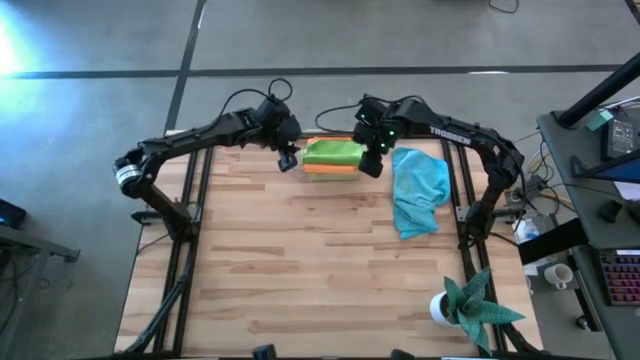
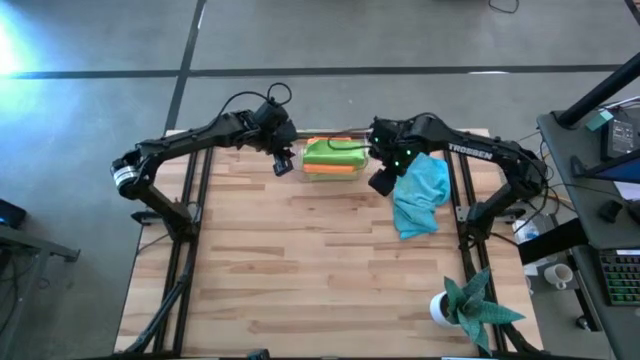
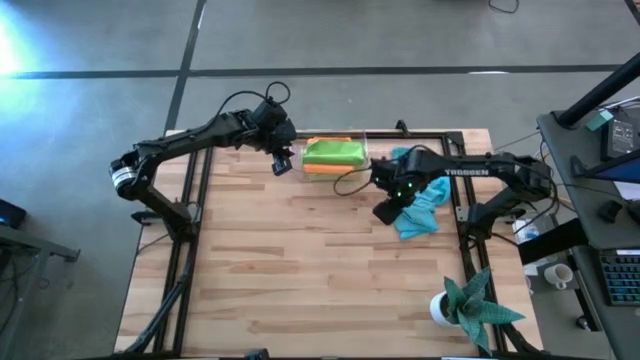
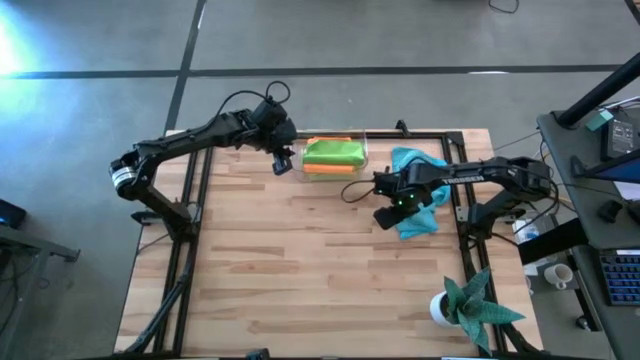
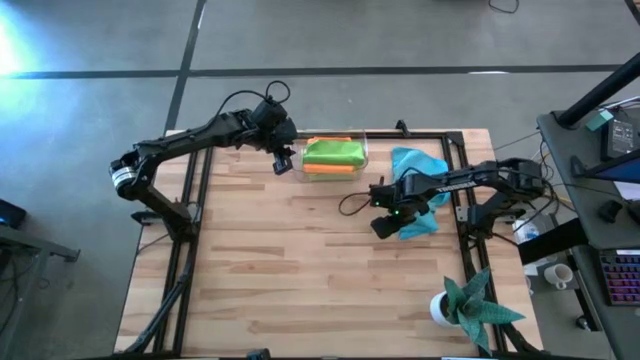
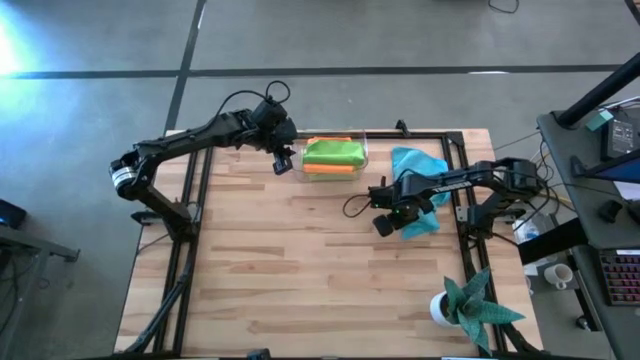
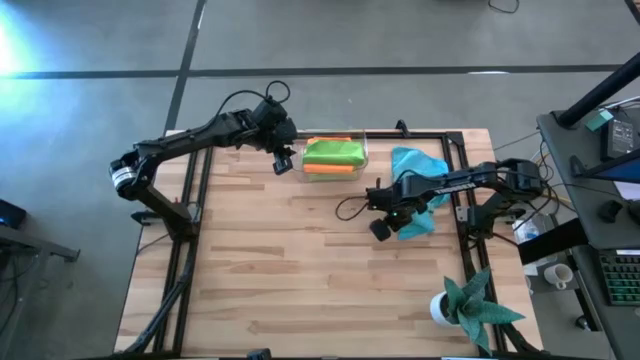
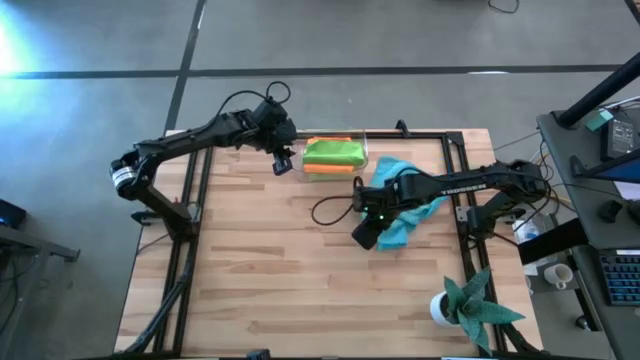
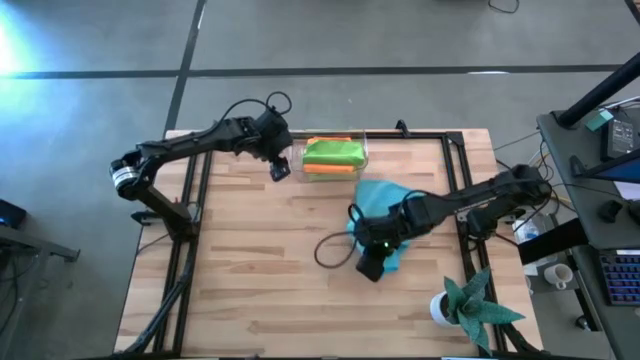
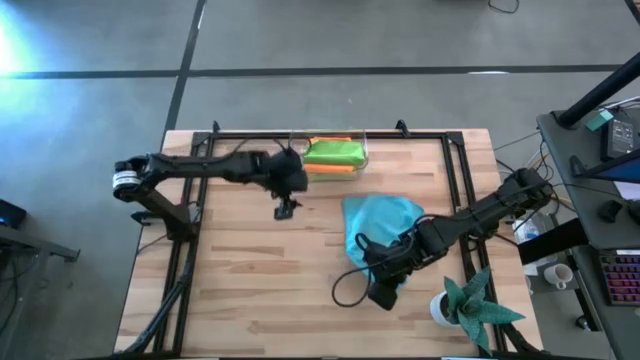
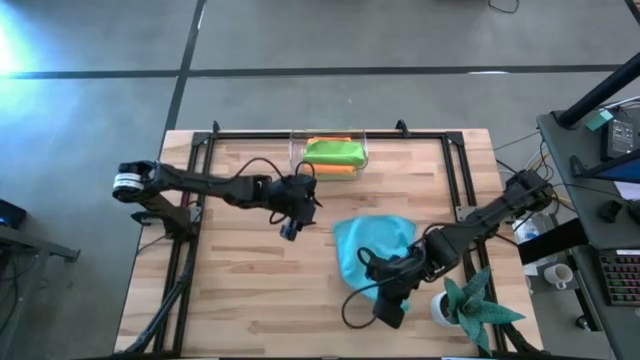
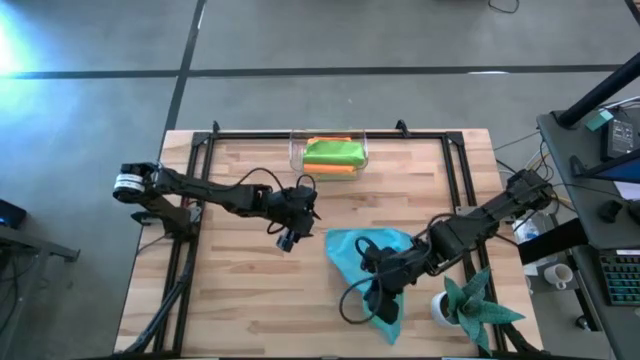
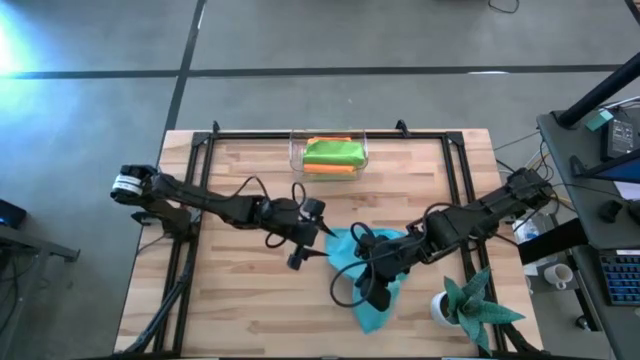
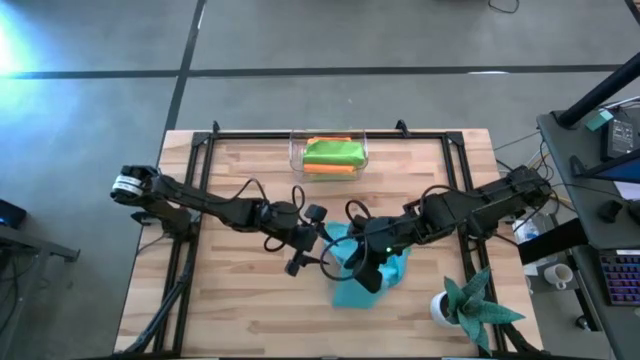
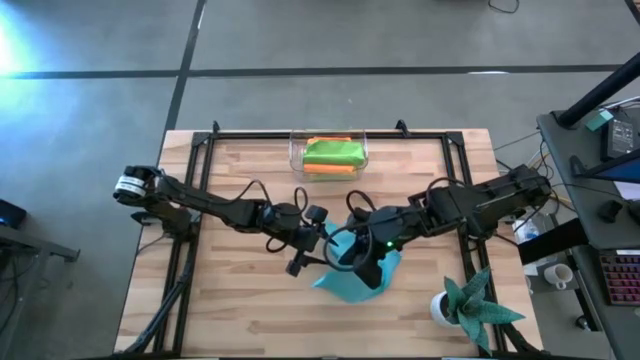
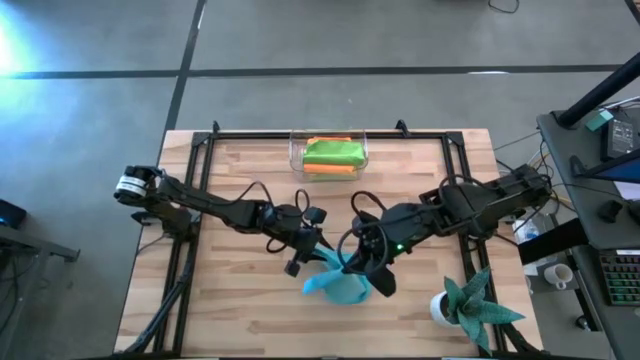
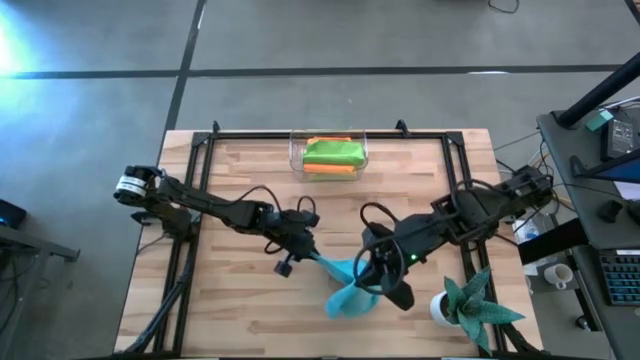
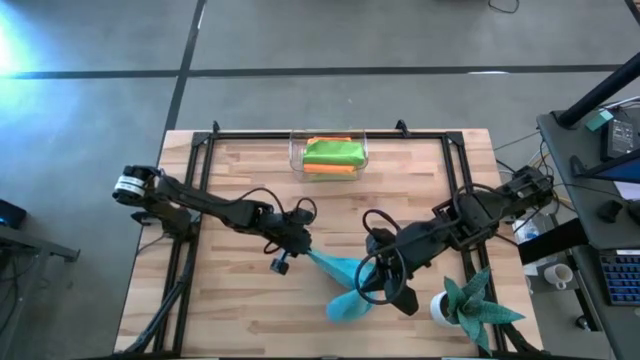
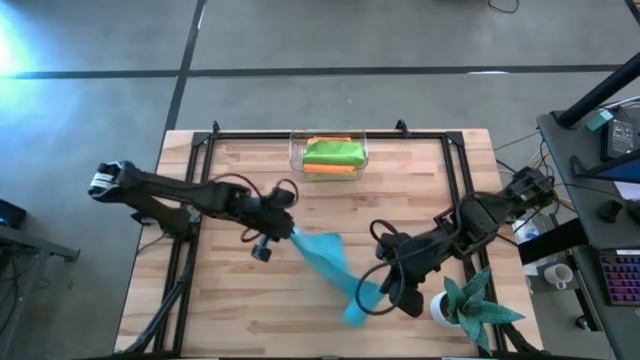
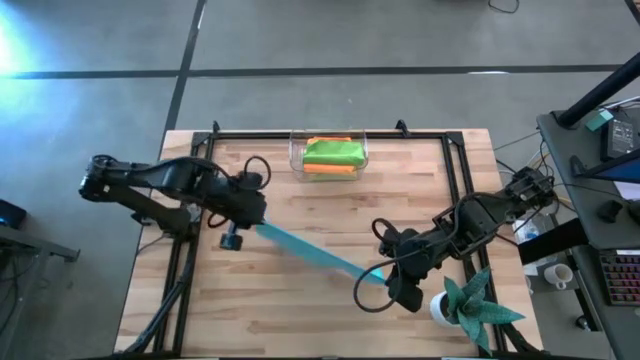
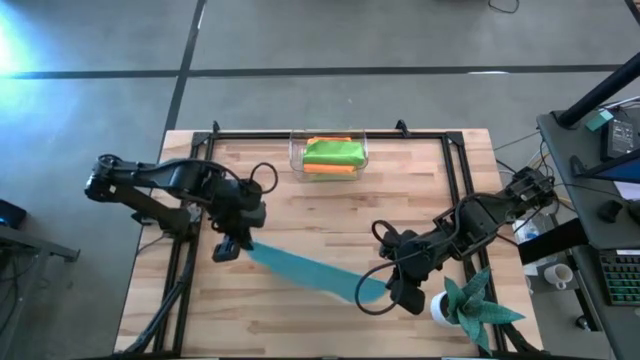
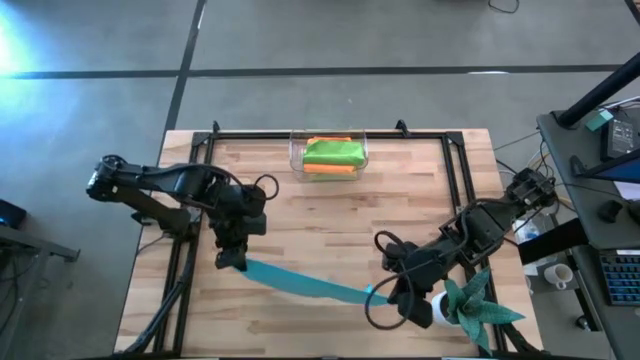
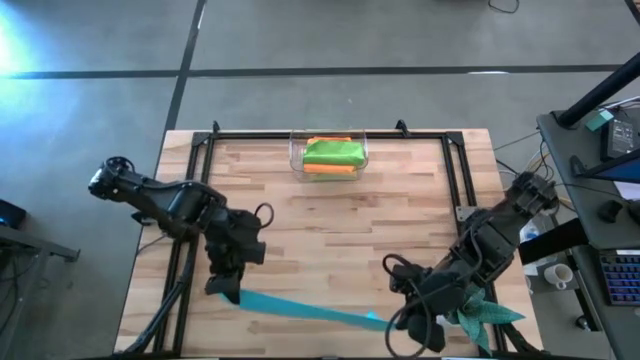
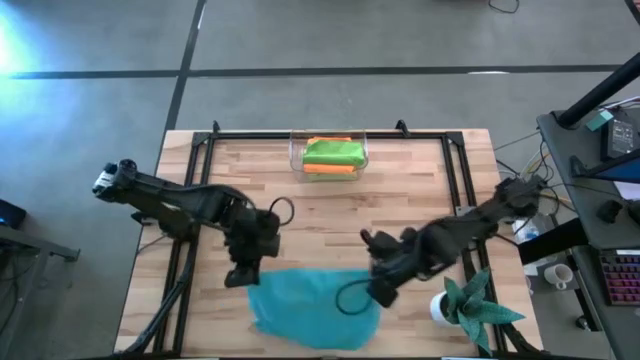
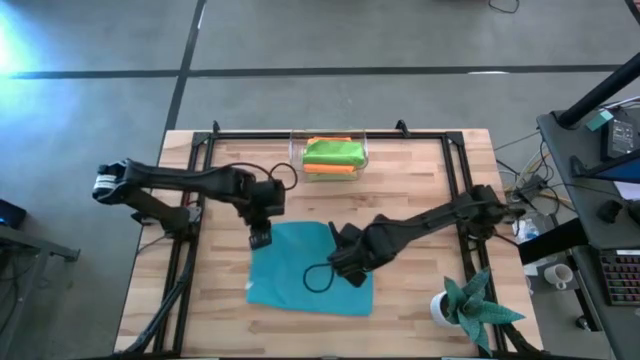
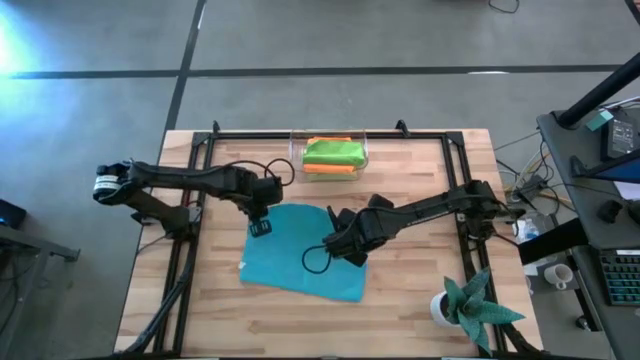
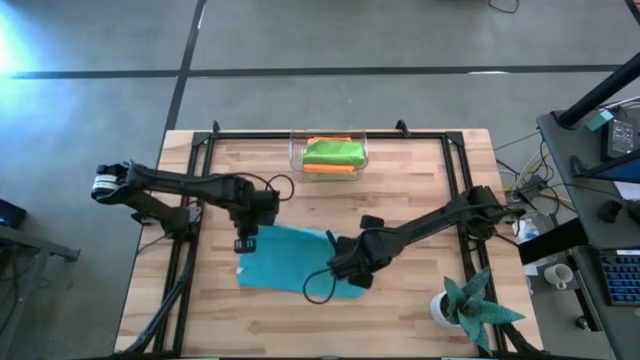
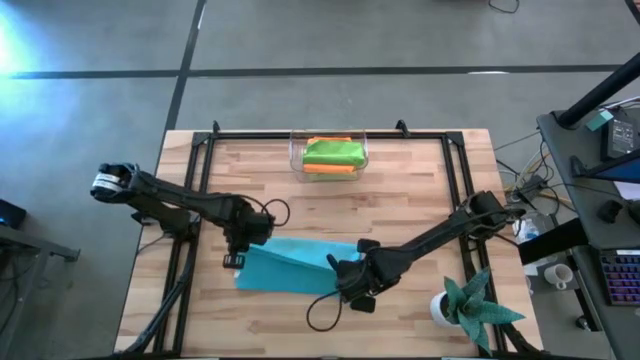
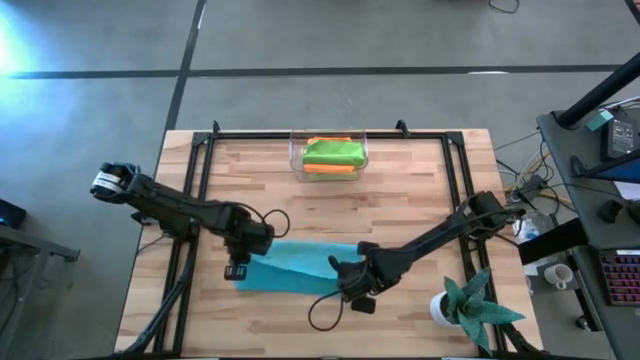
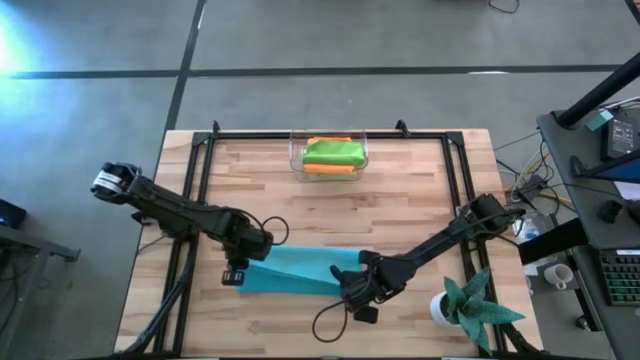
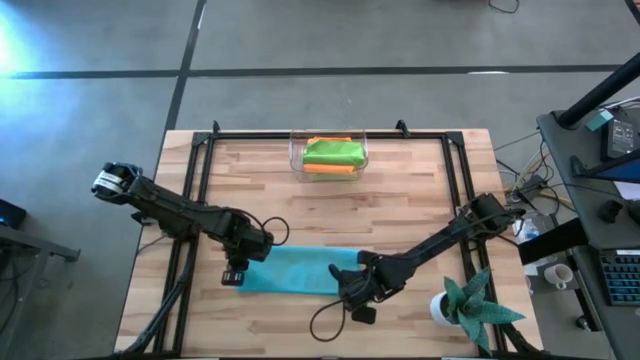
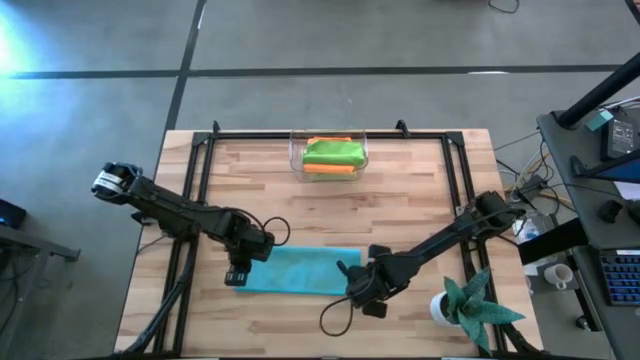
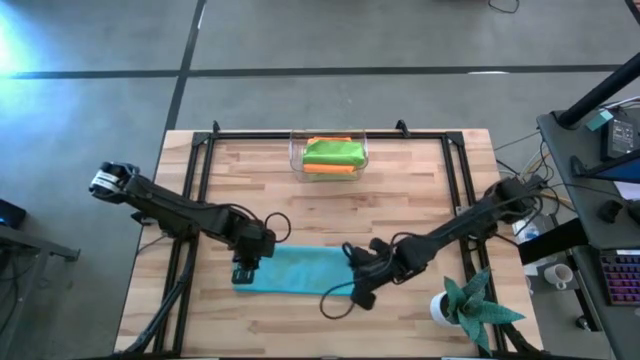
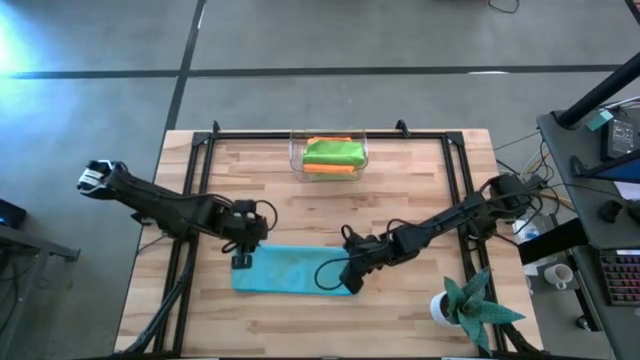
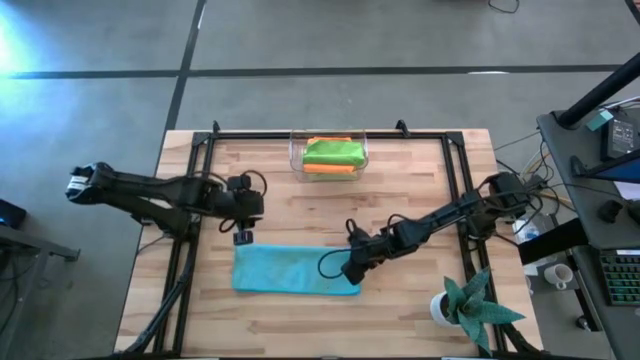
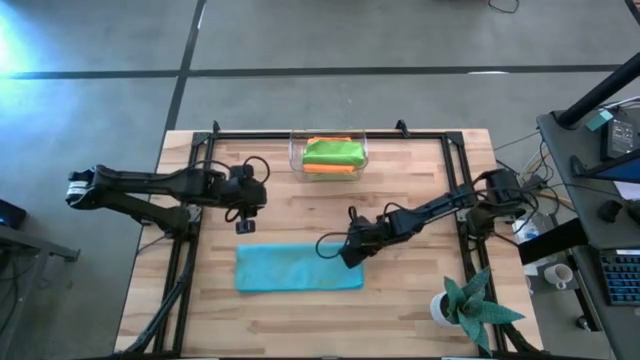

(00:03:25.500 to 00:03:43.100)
Task: Fold microfiber towels
Fold the blue microfiber towel

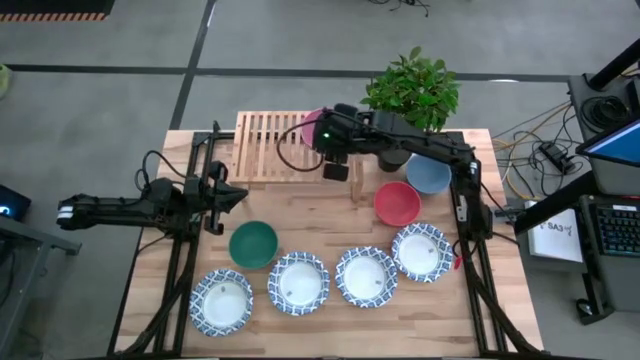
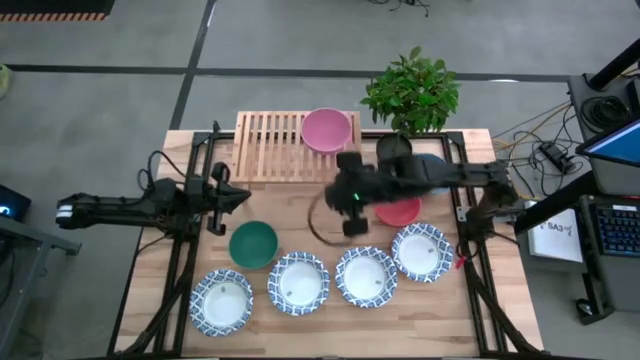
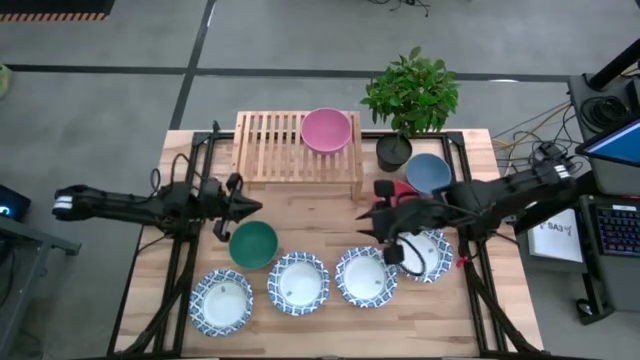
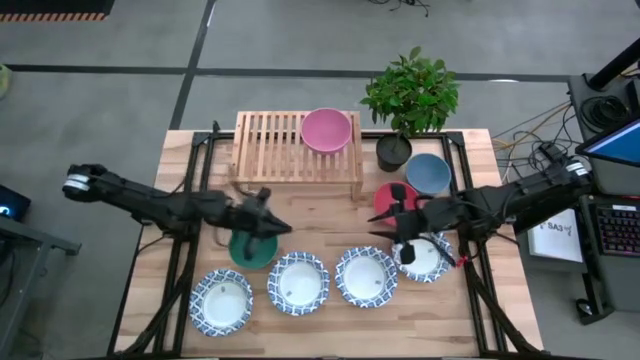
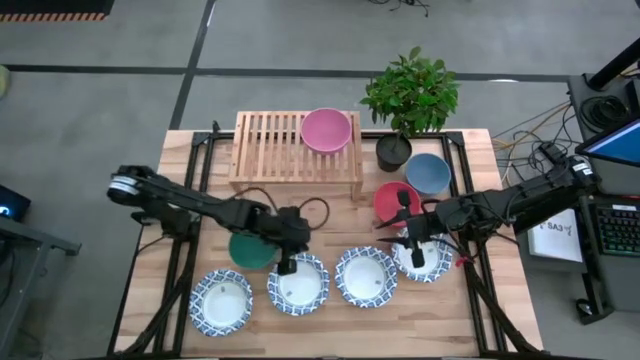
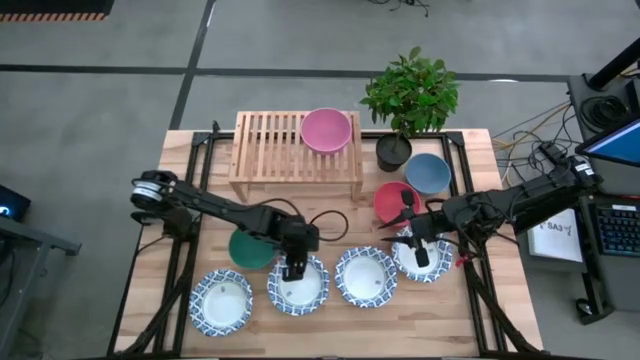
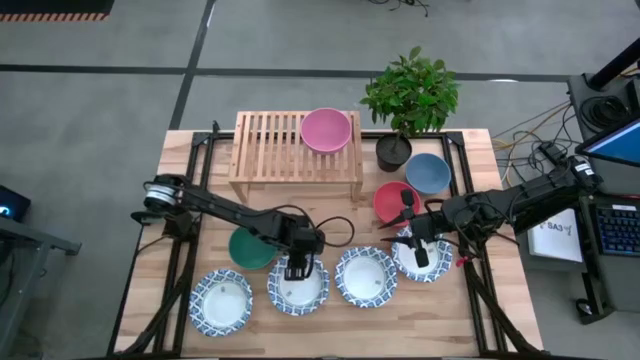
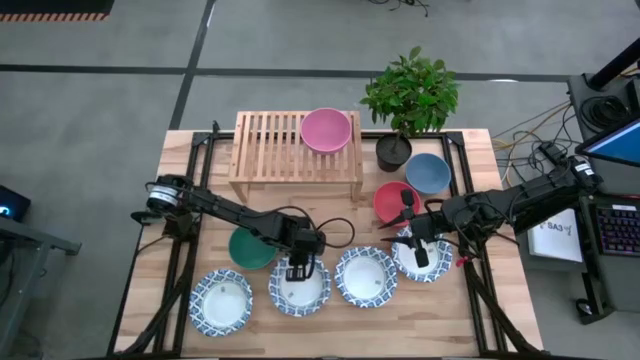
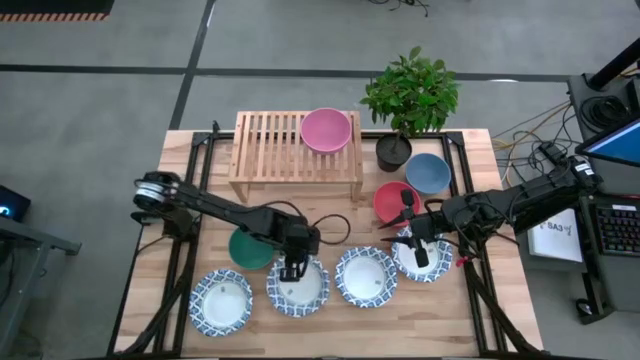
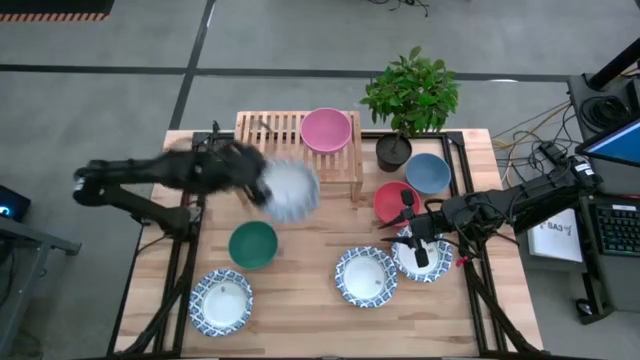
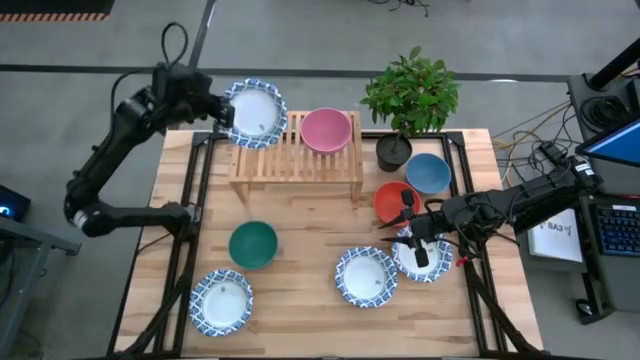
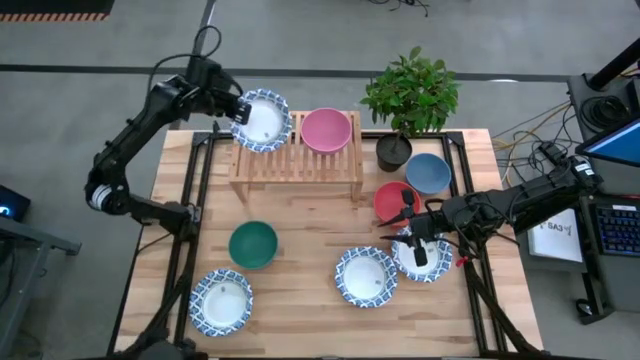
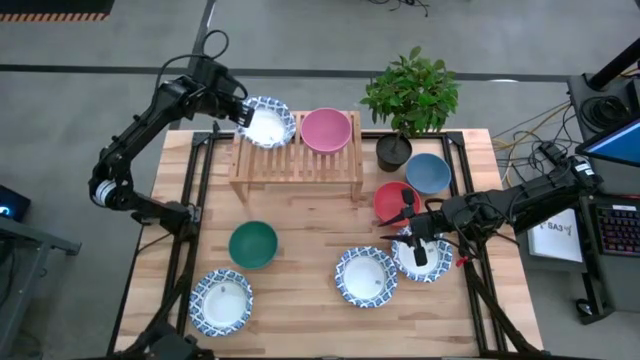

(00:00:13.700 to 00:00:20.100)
Task: Place and stack bowls onto a shelf
Put the white-blue bowl on the shelf
